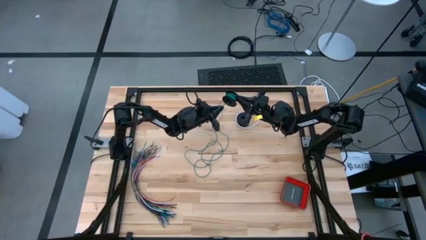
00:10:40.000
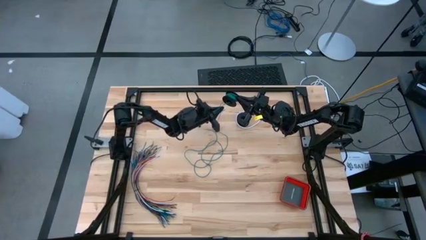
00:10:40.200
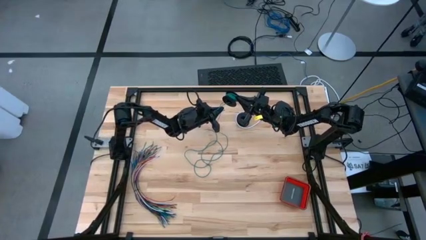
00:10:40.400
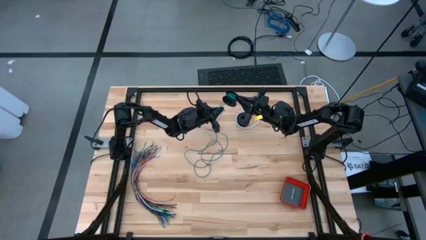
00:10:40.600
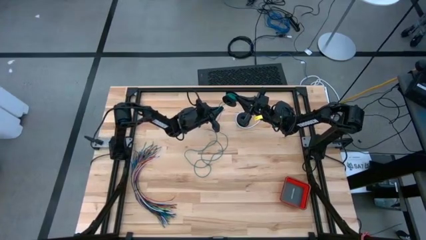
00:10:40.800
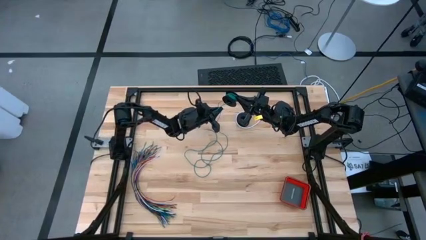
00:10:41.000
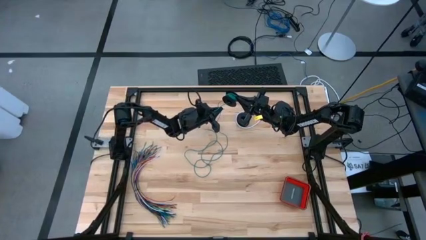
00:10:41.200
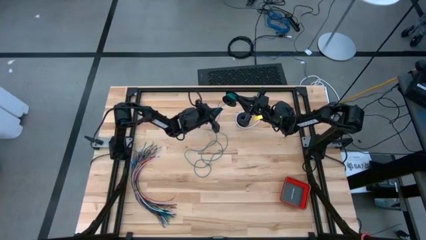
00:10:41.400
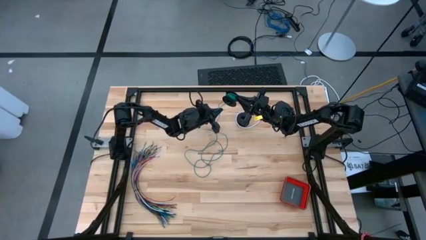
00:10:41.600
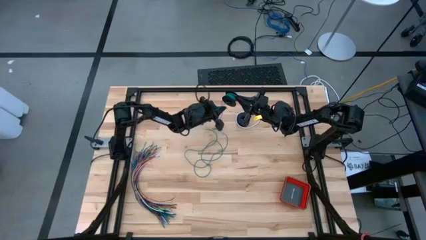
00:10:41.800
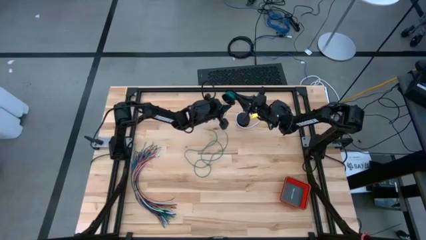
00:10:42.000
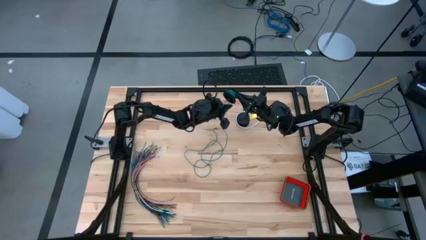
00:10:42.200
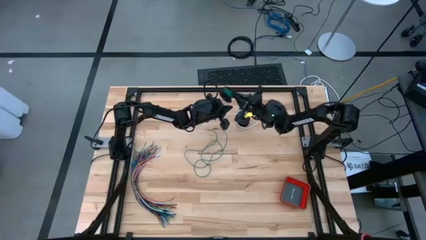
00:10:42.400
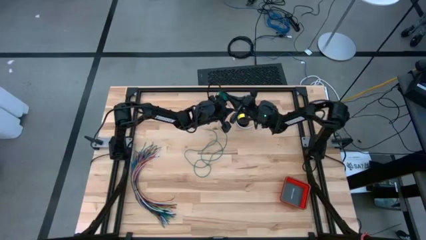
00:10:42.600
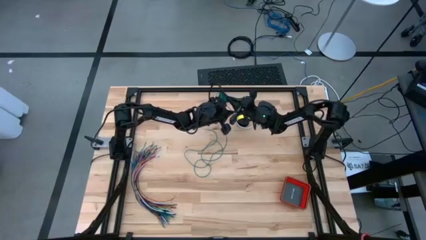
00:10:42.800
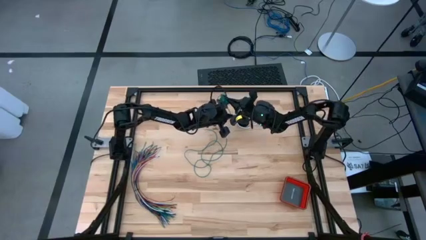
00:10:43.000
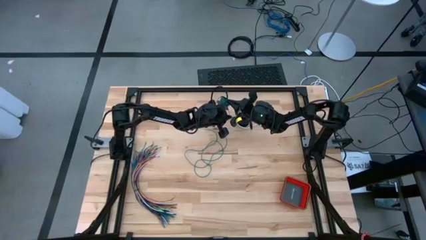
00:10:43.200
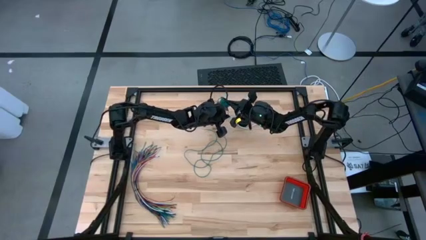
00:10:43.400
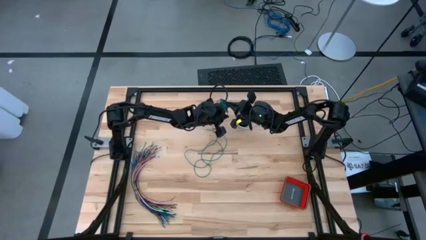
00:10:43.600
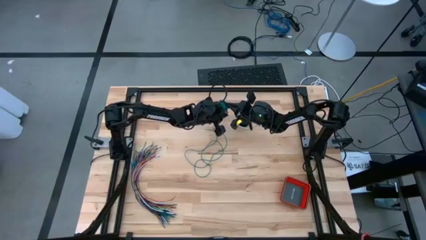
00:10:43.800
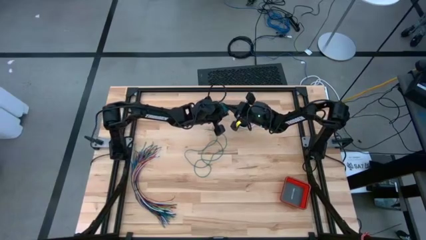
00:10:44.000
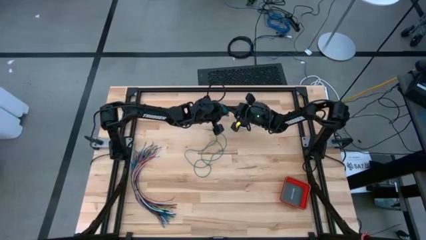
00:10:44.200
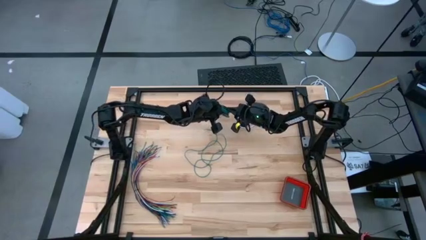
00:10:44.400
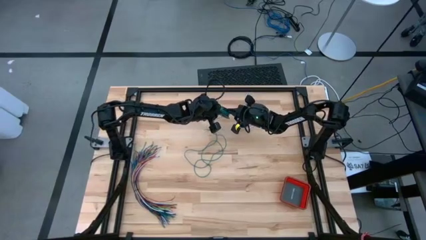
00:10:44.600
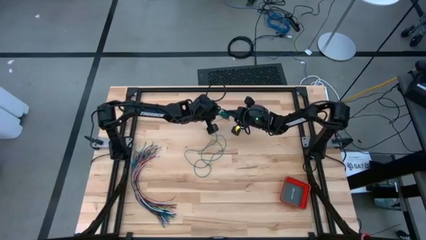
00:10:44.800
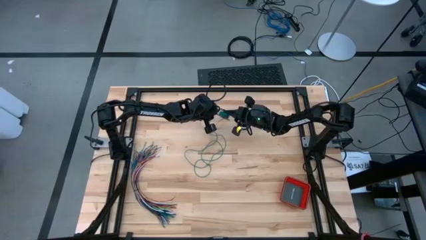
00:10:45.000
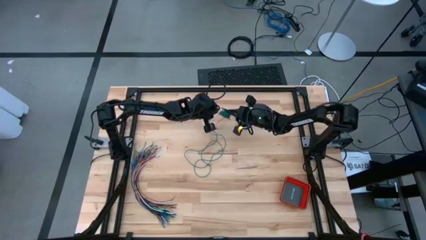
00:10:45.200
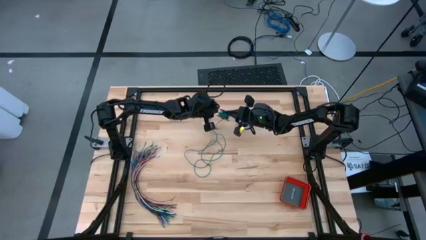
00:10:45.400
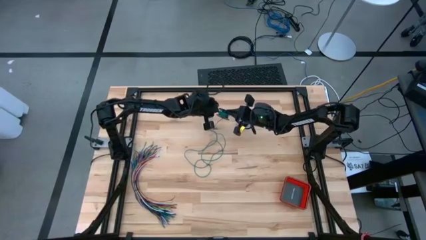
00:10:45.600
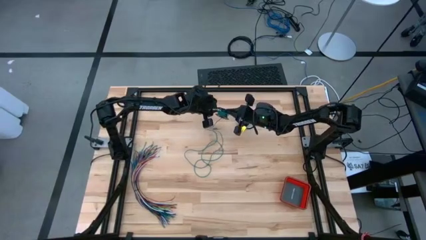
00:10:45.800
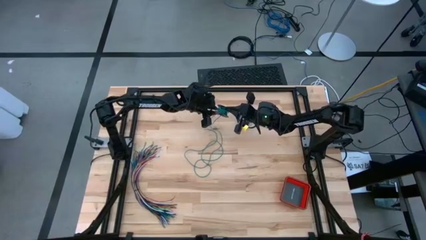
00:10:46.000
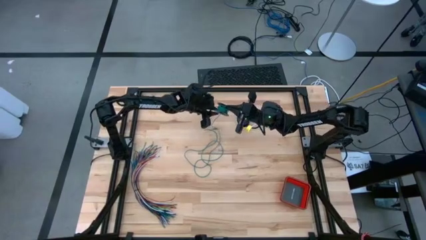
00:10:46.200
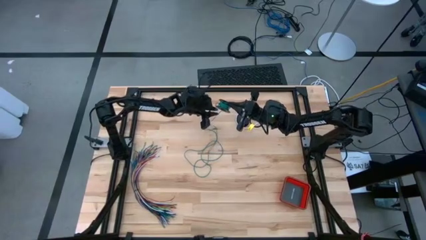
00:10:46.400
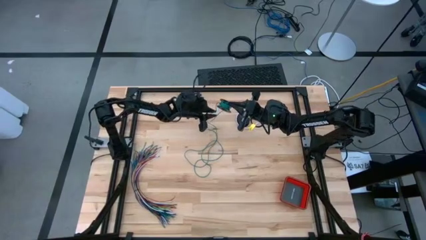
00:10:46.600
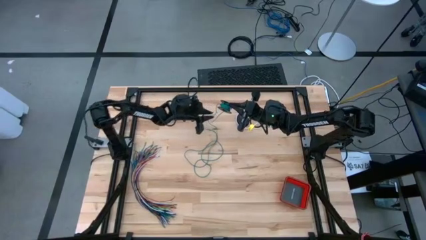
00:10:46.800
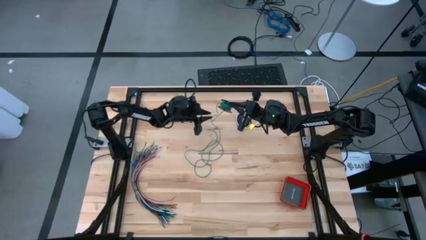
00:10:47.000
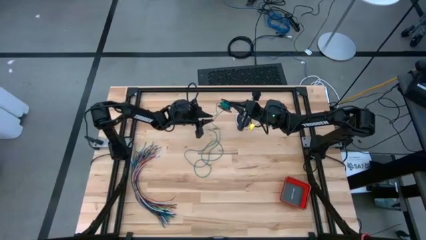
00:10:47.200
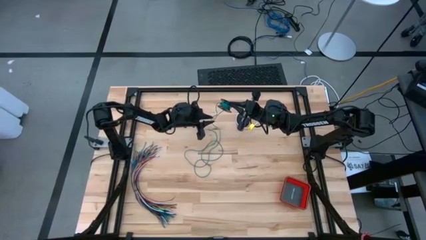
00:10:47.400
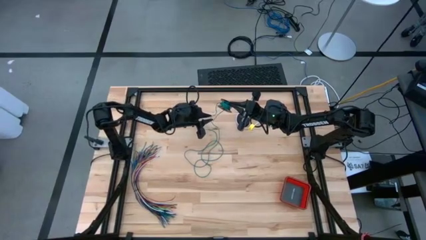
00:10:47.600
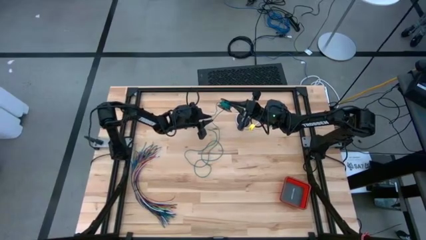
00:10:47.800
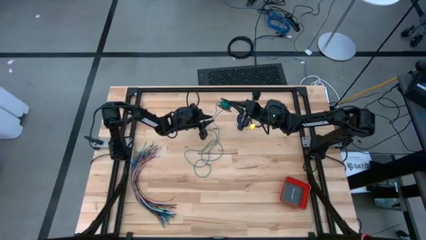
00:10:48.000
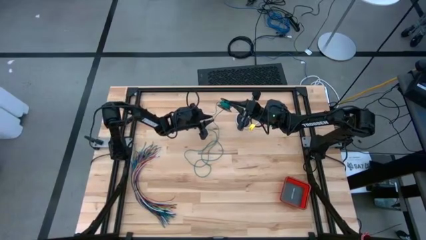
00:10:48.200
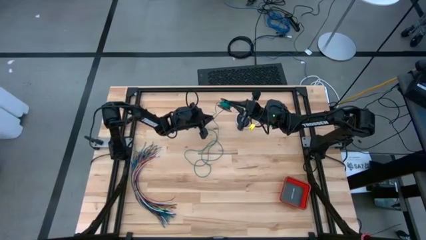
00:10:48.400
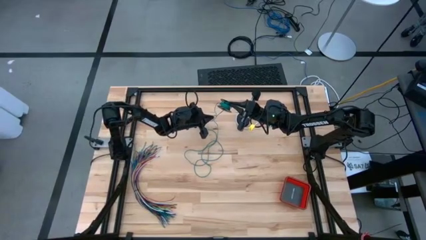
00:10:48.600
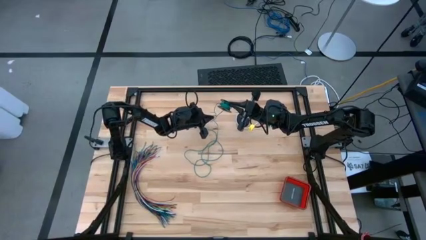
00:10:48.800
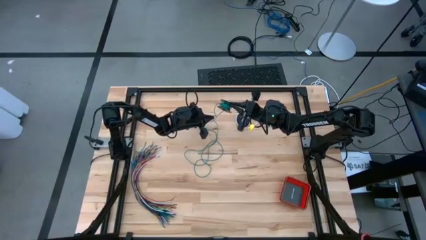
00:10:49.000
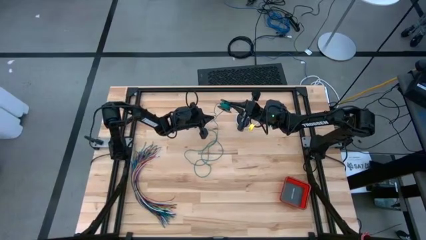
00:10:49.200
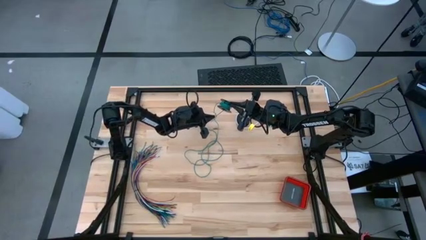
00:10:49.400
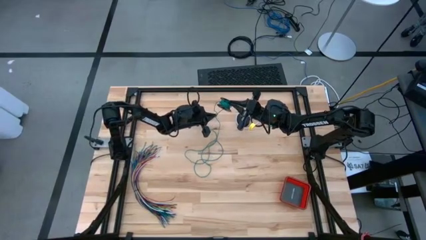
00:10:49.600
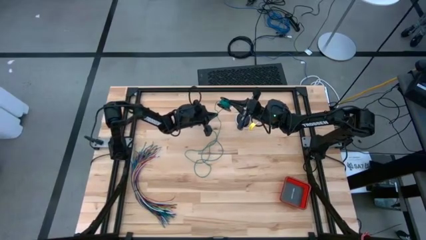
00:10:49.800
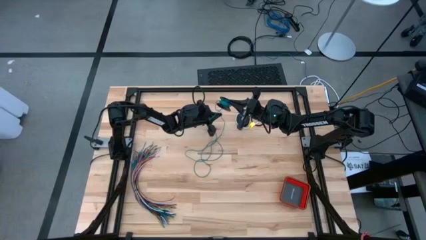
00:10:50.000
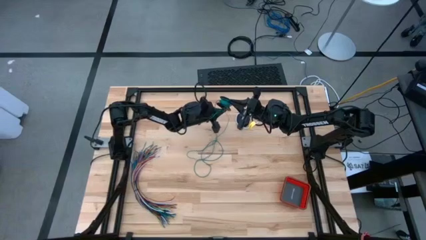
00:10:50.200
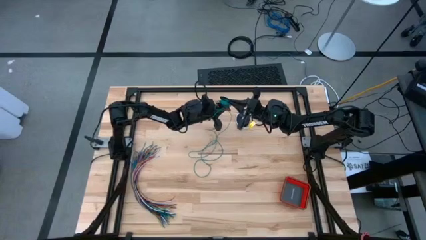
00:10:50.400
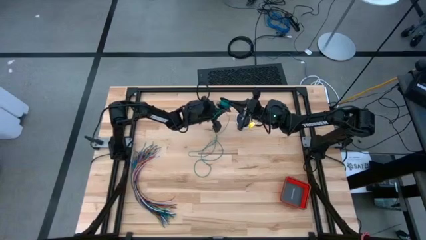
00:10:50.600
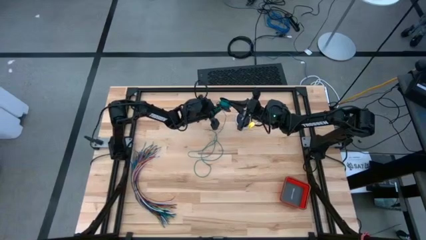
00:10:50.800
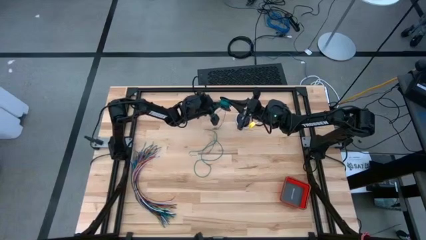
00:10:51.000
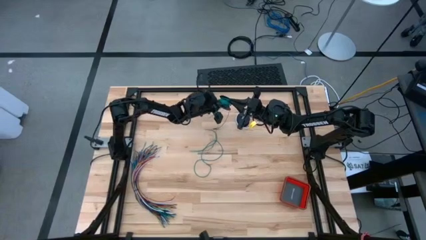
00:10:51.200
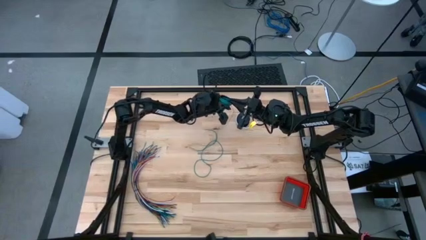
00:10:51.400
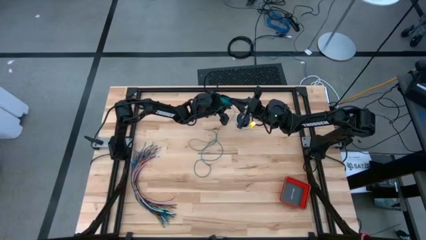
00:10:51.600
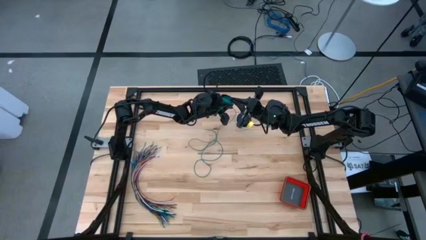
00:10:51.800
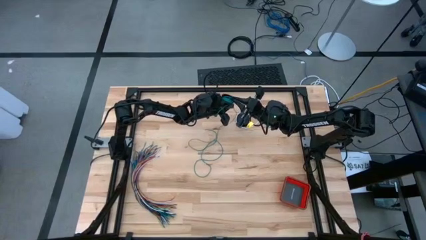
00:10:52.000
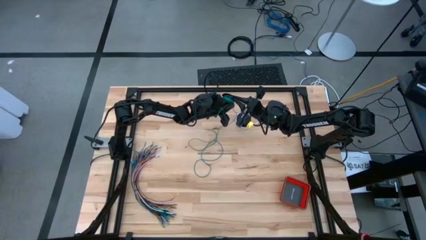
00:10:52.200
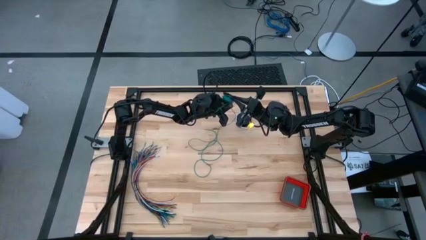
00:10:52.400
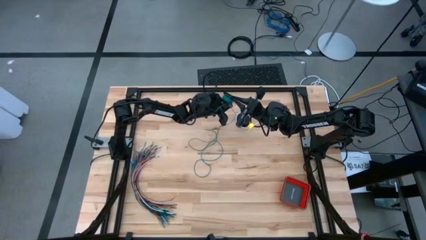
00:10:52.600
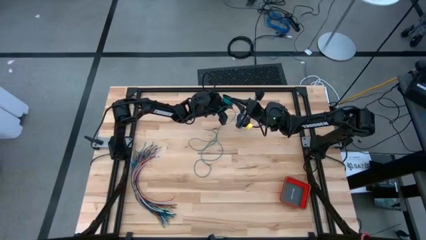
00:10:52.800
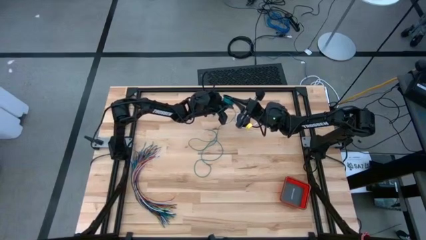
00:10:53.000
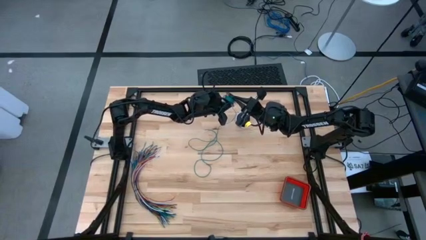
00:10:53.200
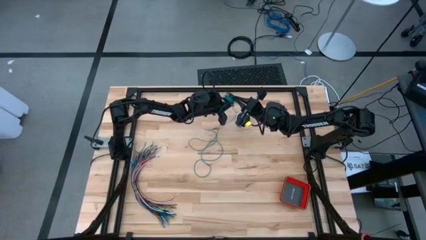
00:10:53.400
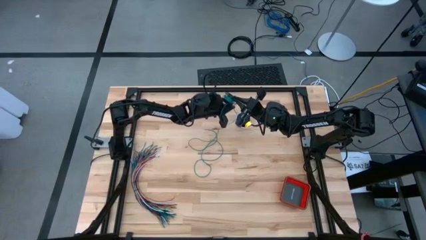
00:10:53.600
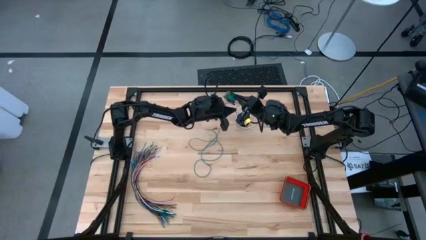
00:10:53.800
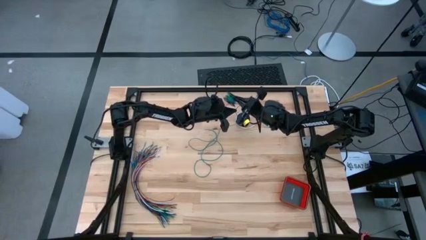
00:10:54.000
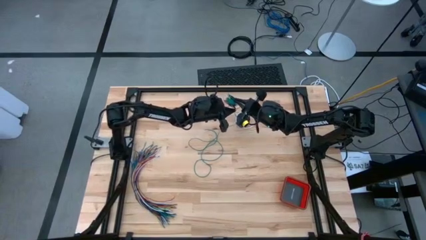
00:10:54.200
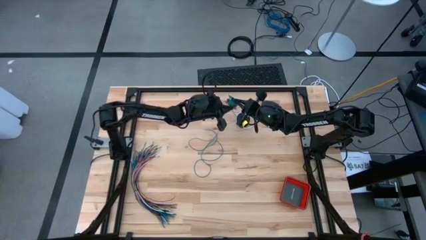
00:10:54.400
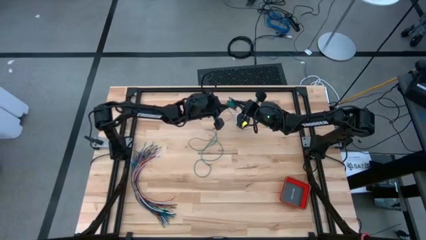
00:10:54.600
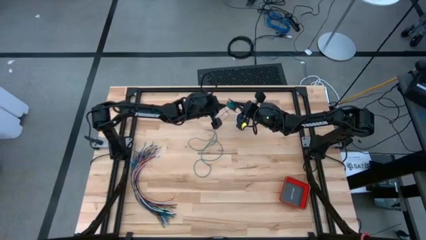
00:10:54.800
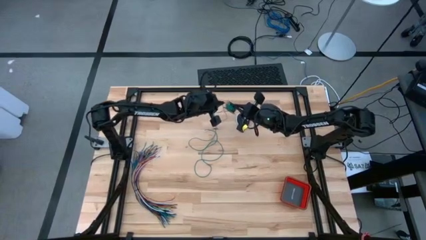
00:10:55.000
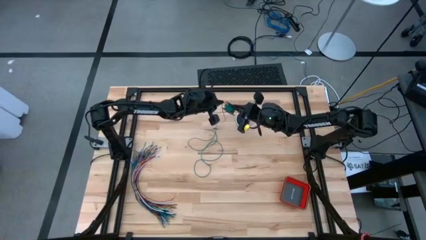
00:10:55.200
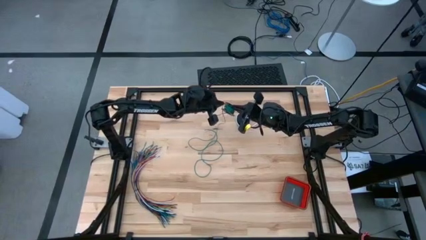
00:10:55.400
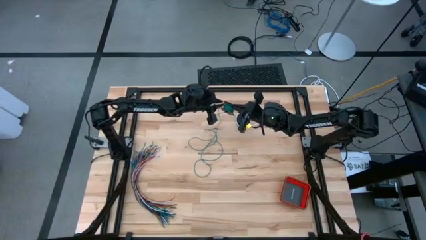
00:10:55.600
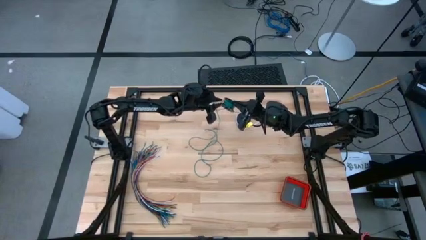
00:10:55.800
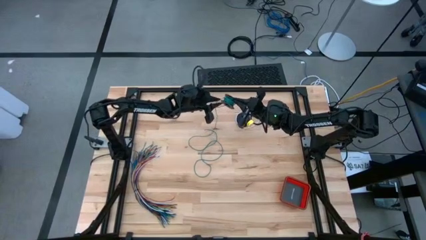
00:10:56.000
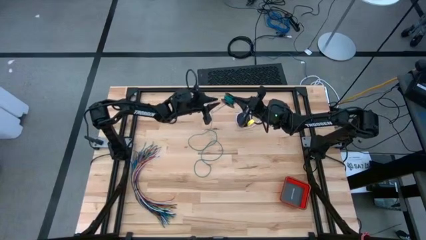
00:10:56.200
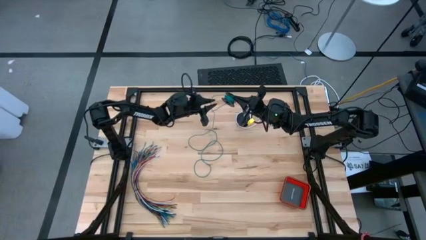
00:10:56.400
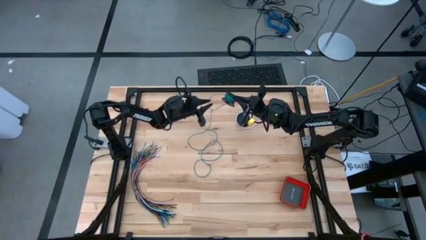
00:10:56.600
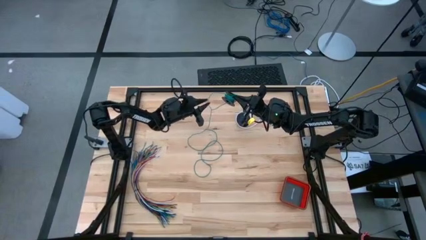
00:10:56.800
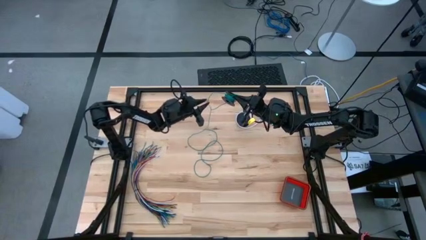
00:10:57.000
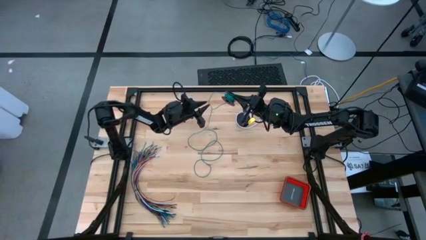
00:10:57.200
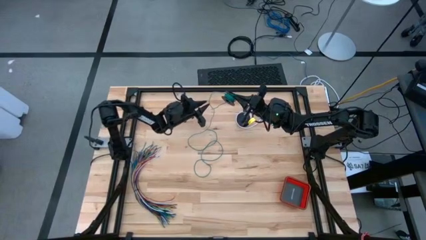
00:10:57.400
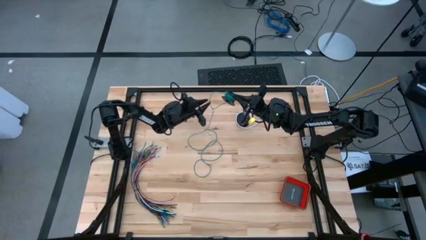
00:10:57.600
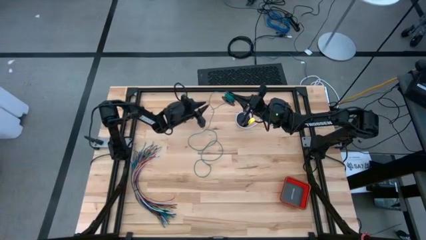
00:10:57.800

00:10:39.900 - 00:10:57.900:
Task: Coil cords
Coil the green wire onto the spool
